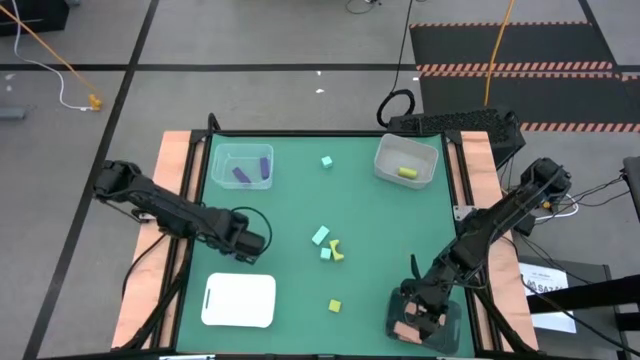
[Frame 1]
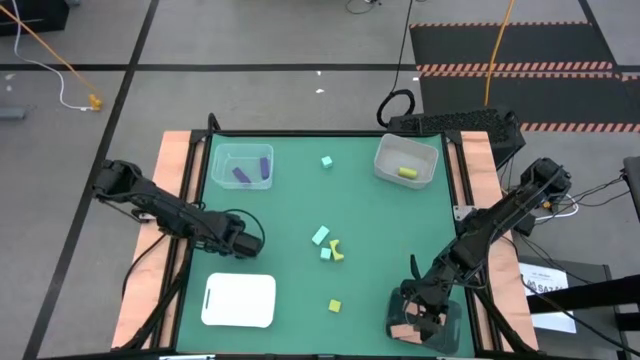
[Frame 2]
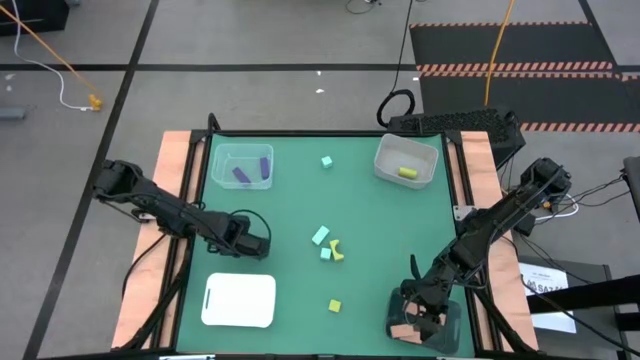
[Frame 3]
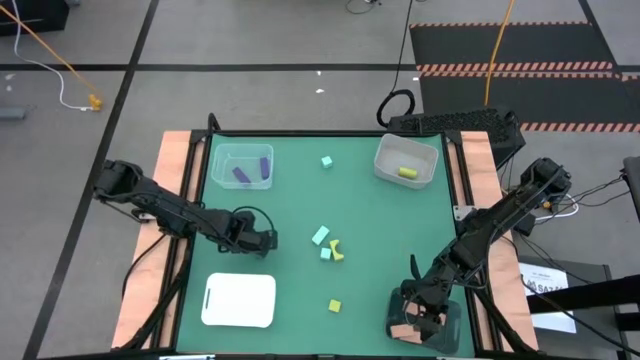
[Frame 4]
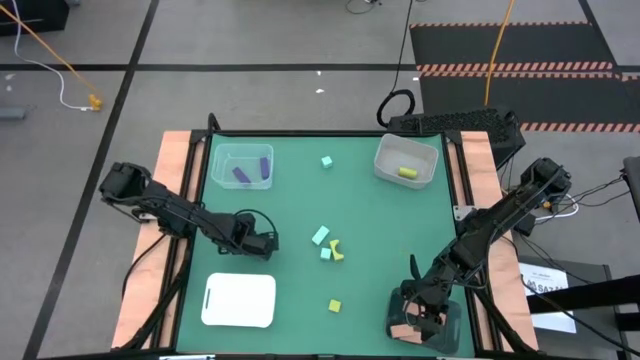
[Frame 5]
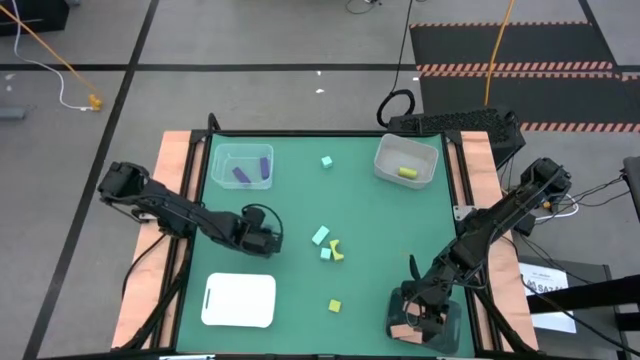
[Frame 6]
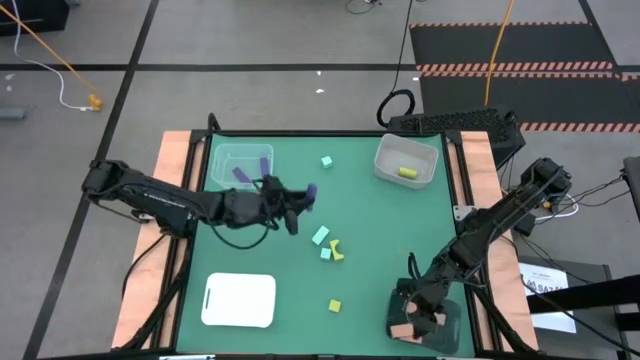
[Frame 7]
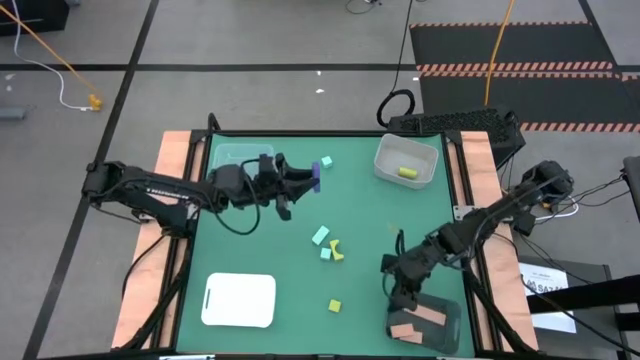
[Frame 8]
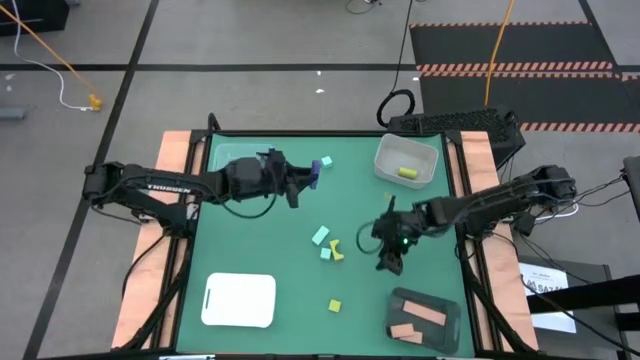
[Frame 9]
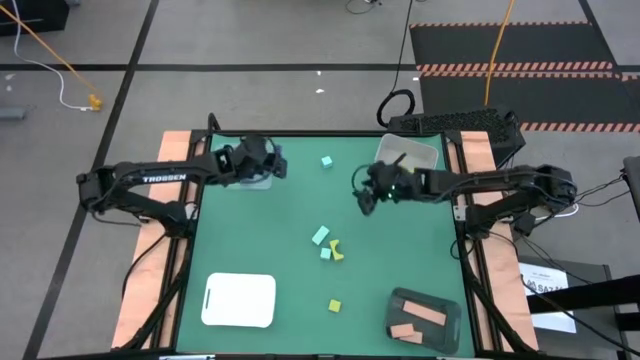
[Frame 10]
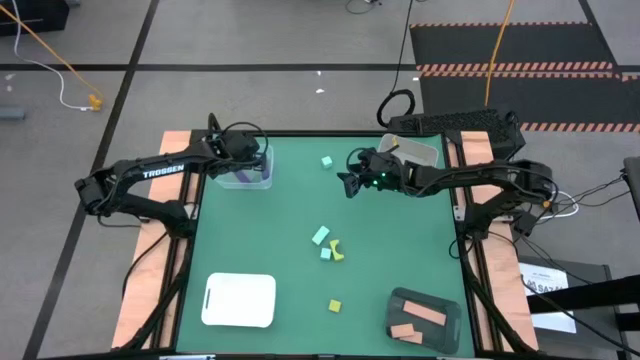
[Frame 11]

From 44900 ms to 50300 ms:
Task: Sort & place blocks by color
Put the violet block into the transparent bin

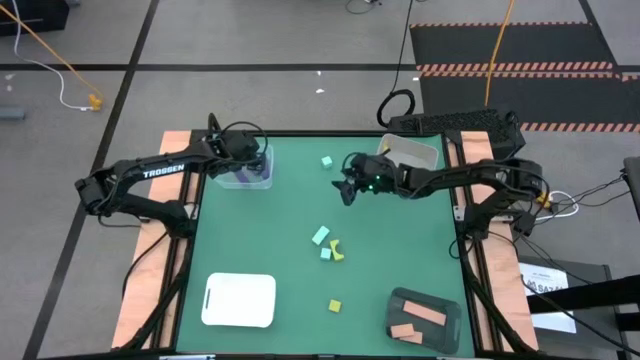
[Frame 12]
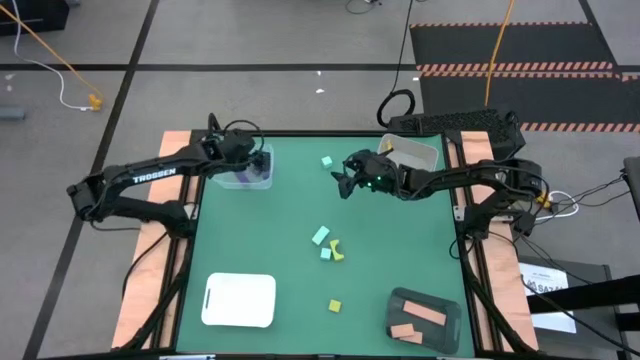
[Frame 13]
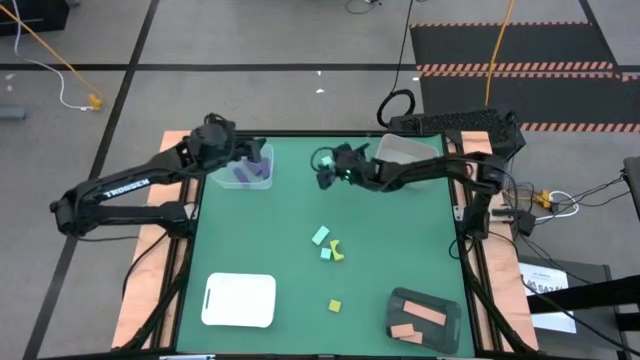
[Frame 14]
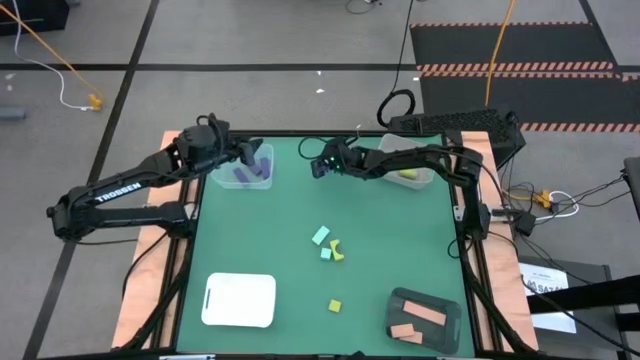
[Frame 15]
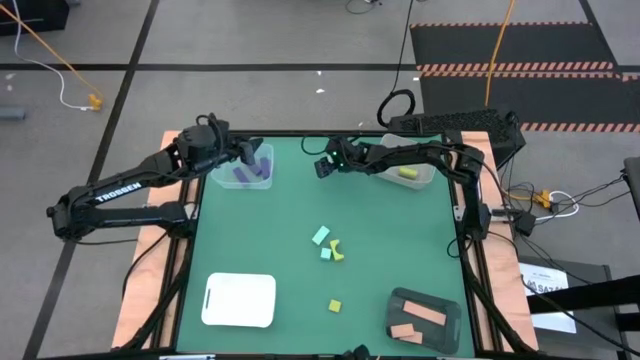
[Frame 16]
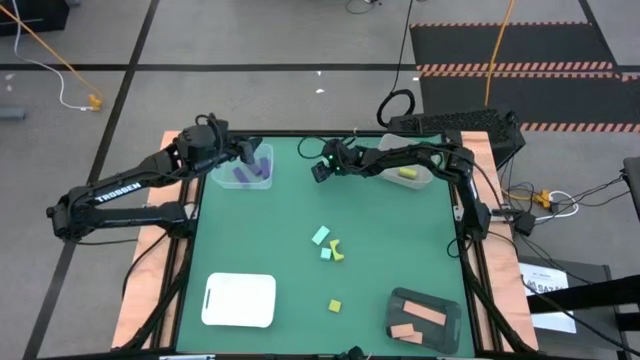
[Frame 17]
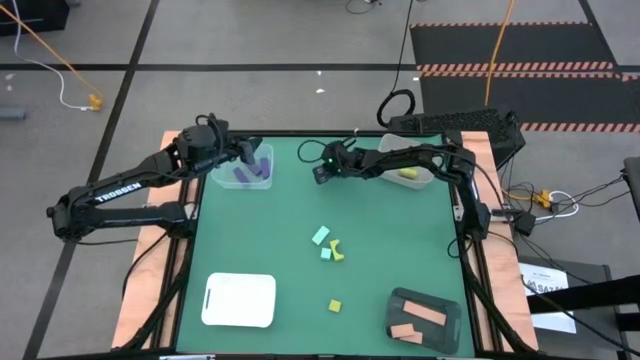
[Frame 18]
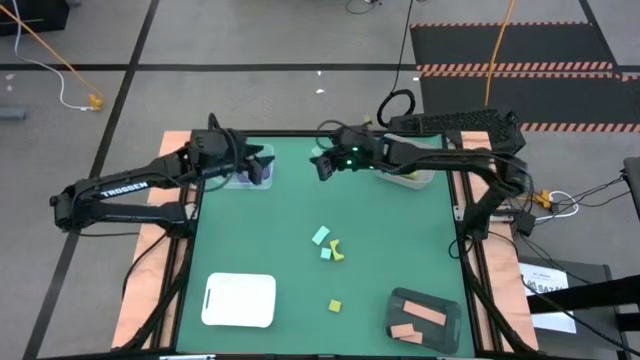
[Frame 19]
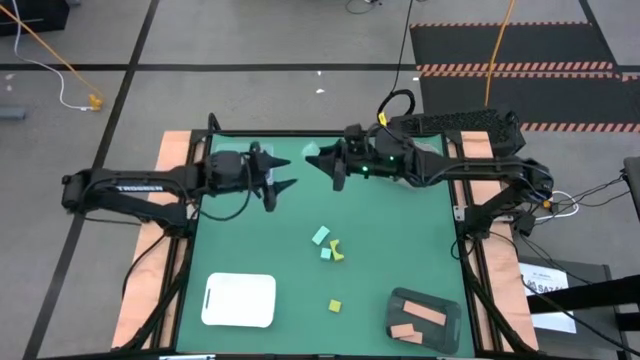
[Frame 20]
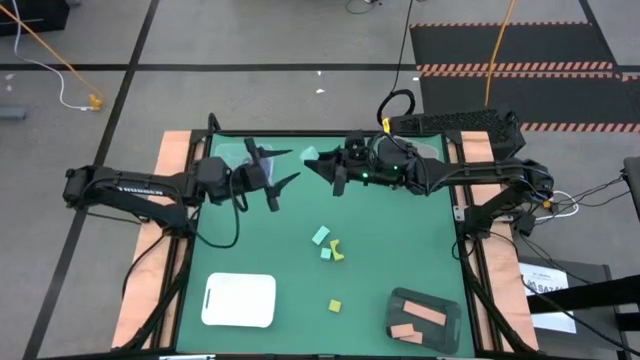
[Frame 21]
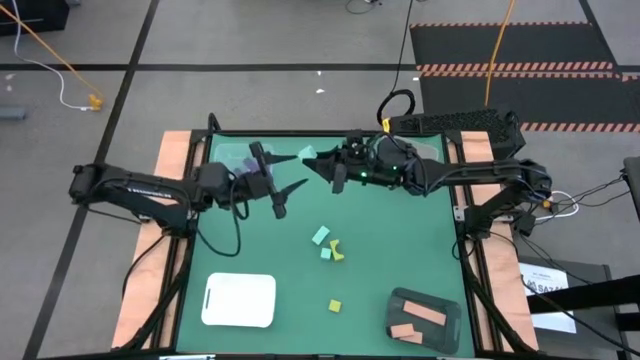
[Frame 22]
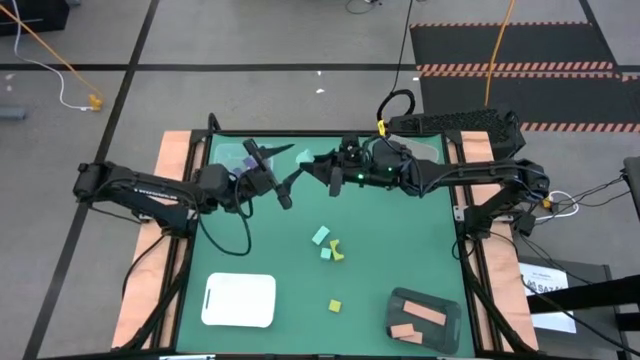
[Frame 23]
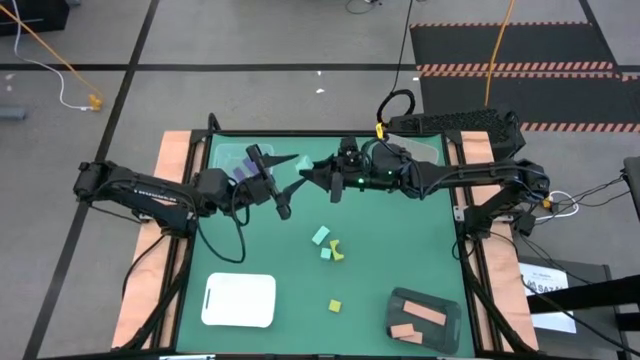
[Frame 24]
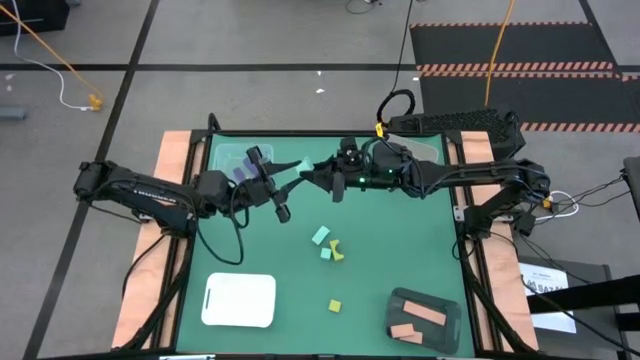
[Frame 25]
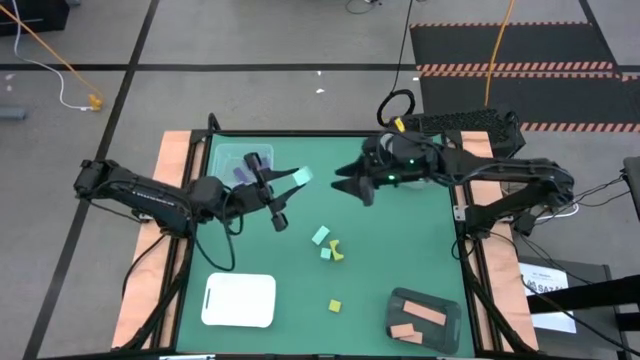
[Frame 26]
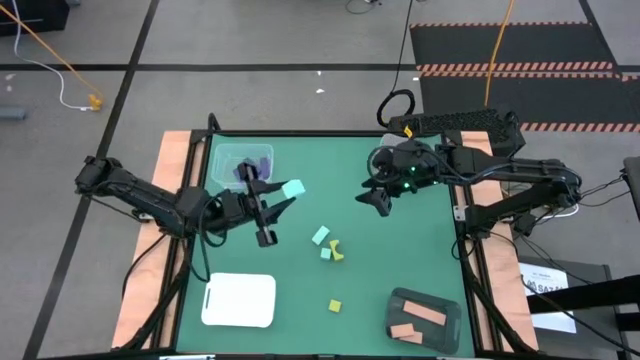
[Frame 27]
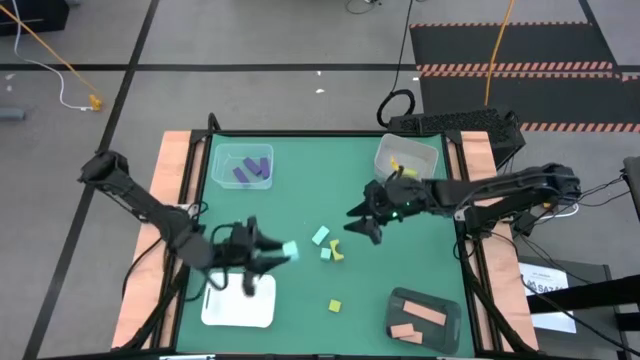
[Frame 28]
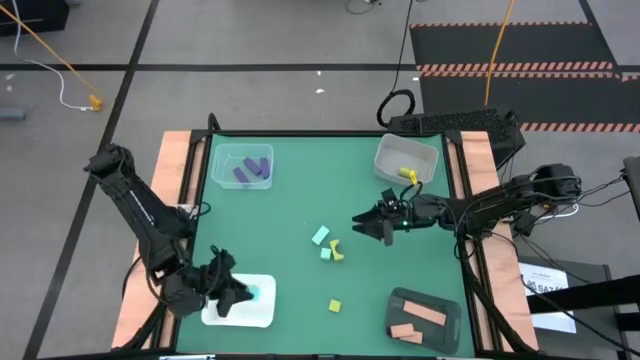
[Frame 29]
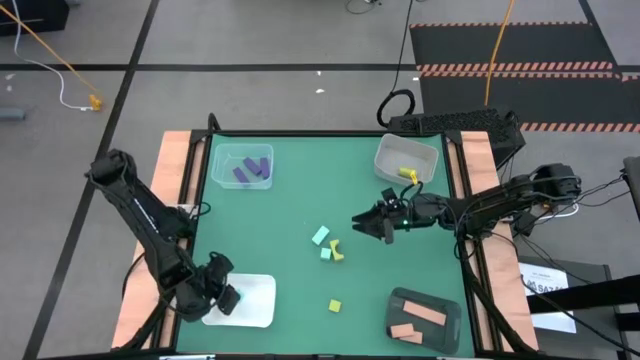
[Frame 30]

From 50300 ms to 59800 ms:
Put the top light blue block into the white bin

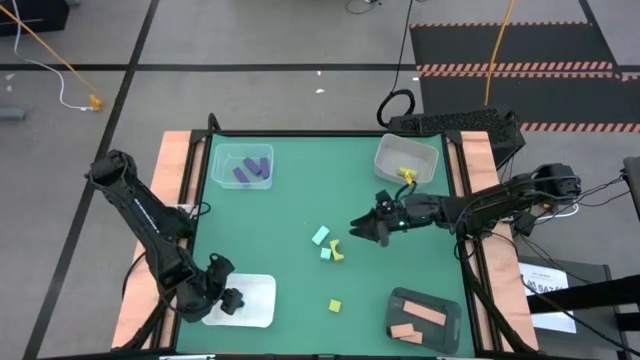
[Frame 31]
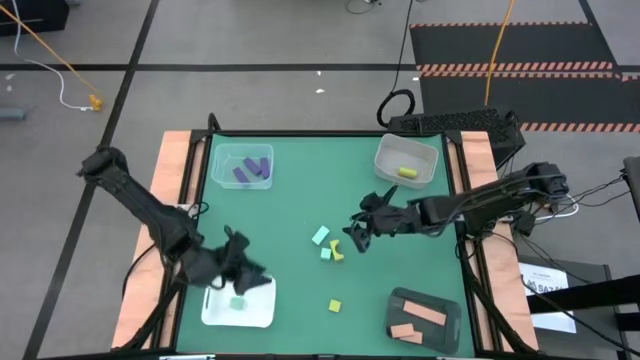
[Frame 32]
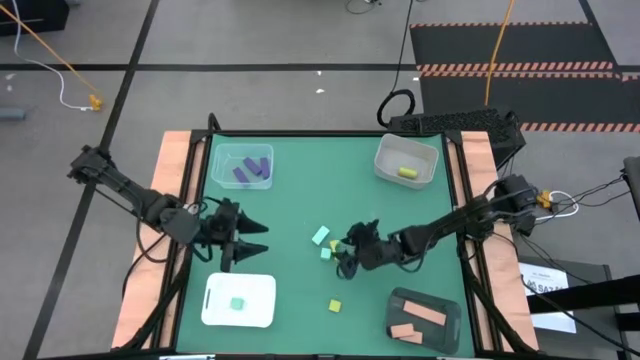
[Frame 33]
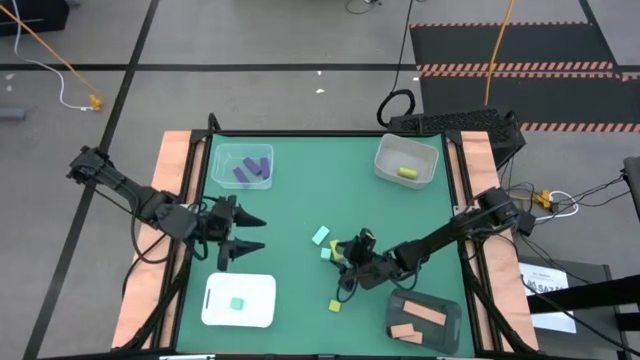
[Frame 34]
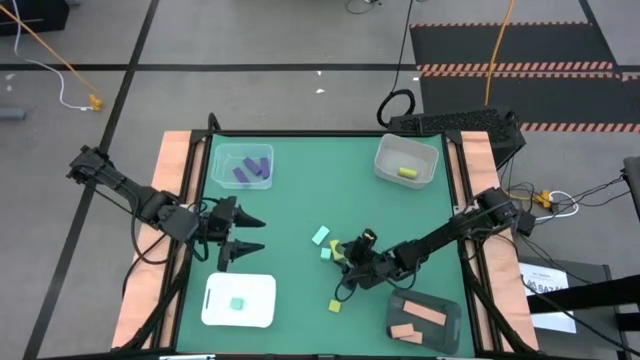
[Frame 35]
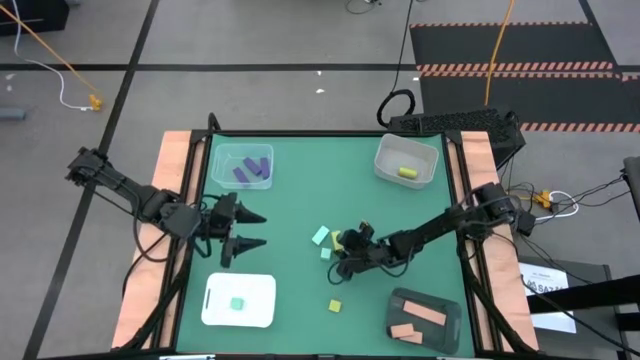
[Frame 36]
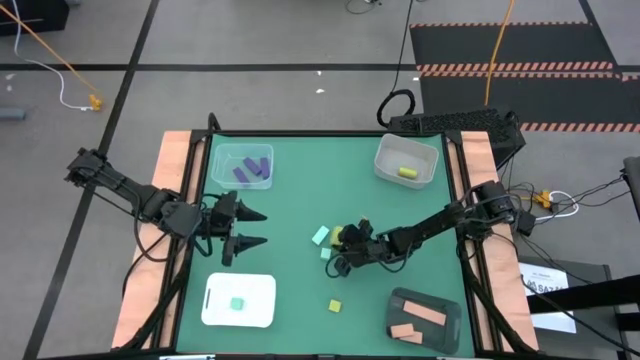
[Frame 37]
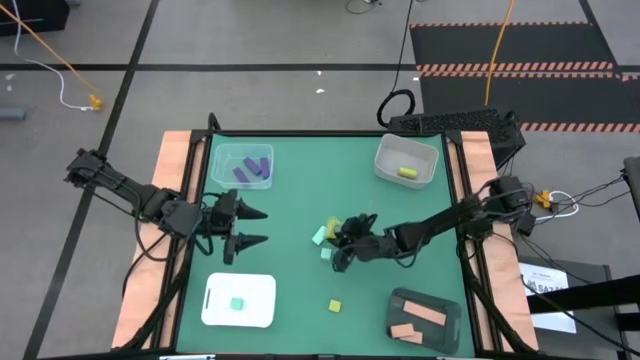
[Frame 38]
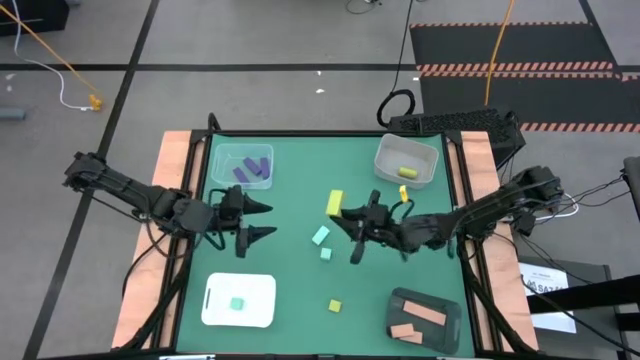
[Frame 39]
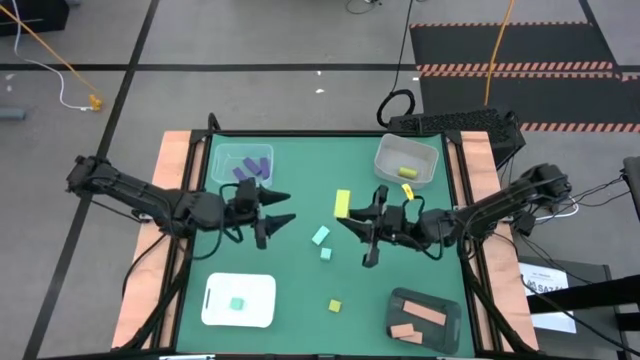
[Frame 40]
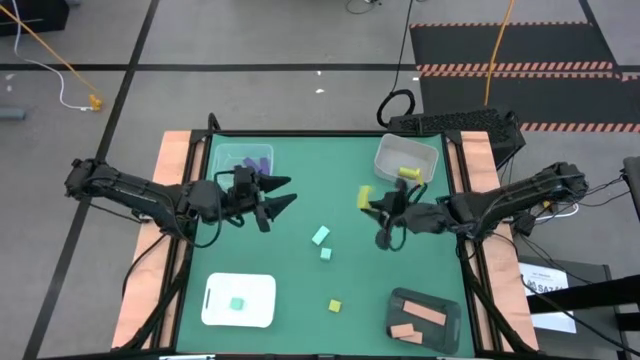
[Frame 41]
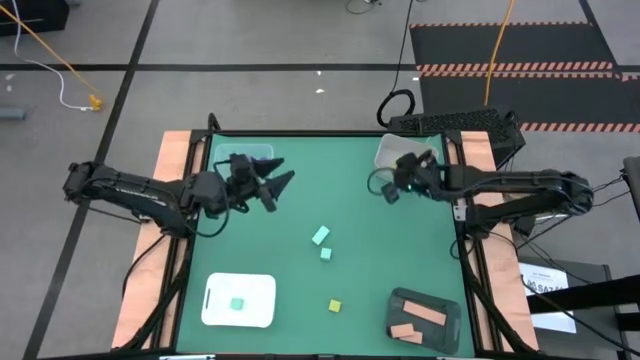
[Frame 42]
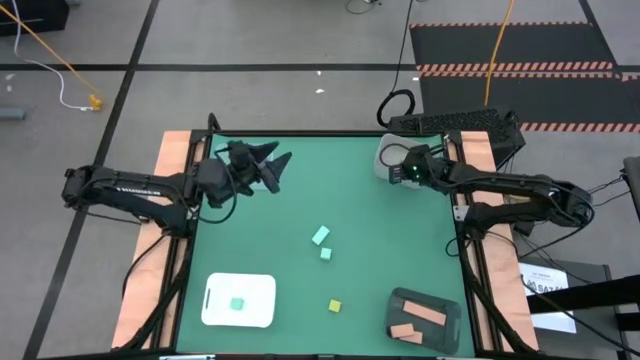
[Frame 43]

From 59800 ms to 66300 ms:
Put the top light green block into the gray bin

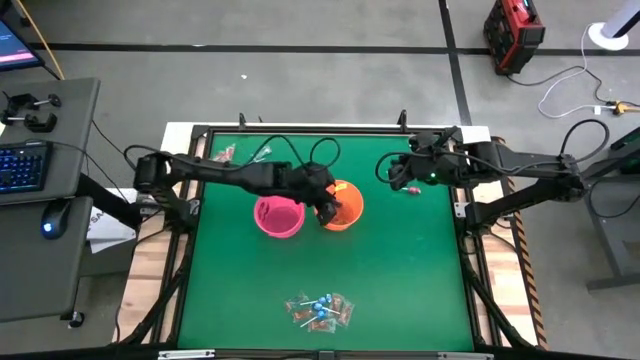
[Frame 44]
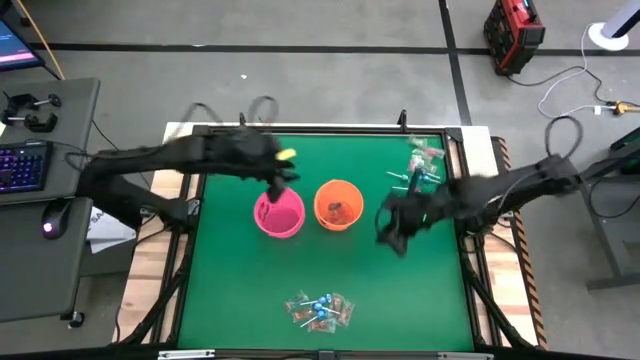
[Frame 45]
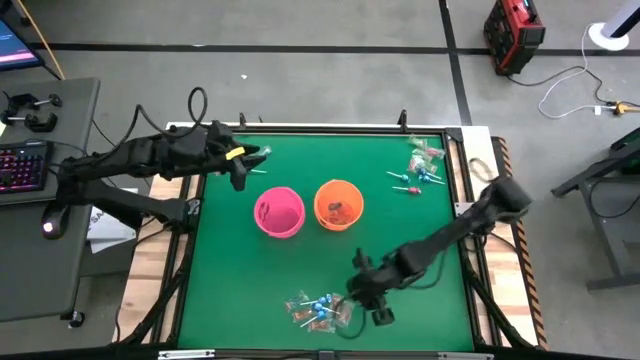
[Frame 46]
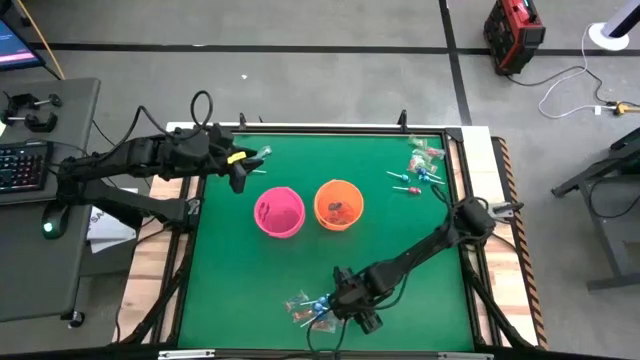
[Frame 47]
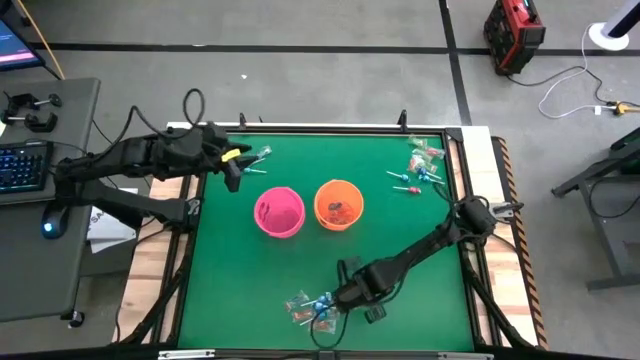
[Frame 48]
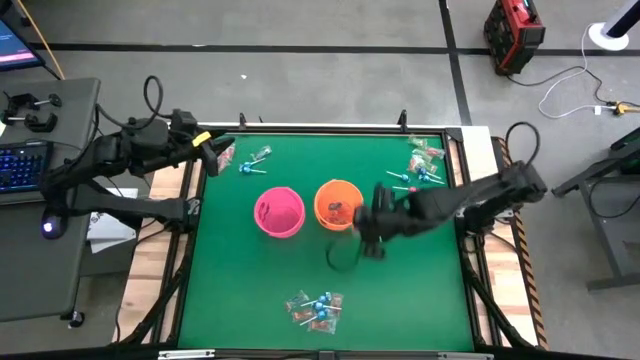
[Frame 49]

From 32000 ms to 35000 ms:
Task: Sort candy by brand, put in halloween buckets
Put the orange gummy into the orange bucket
